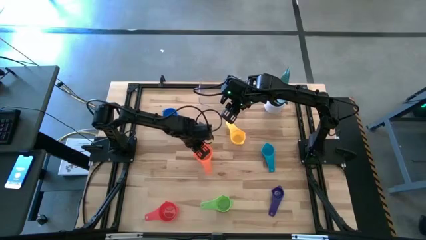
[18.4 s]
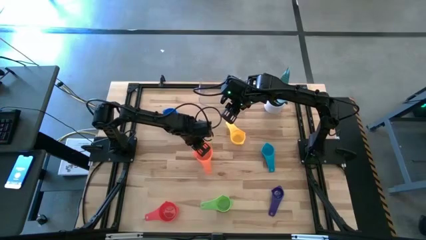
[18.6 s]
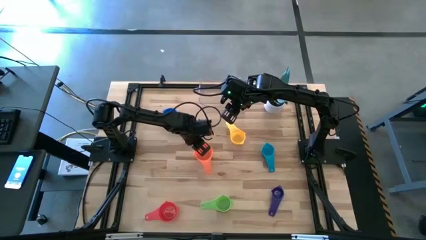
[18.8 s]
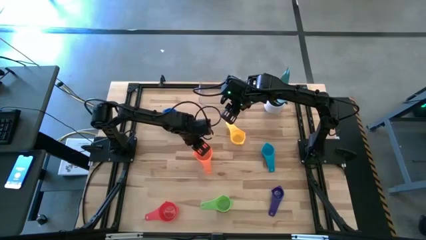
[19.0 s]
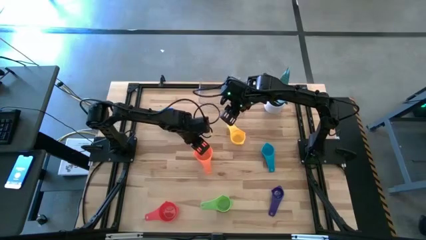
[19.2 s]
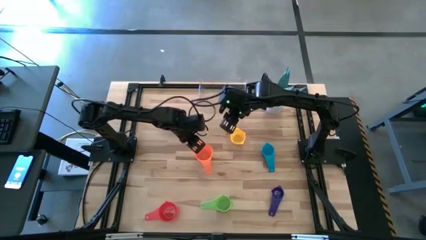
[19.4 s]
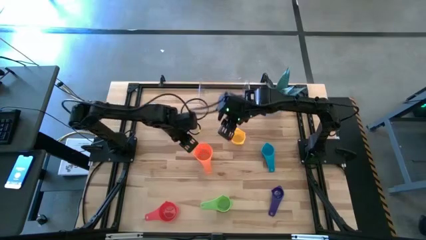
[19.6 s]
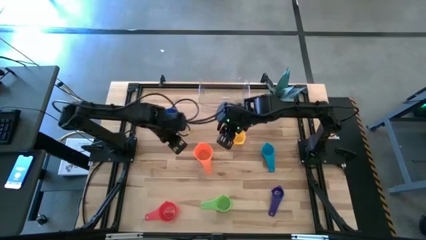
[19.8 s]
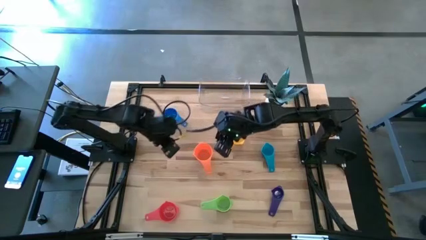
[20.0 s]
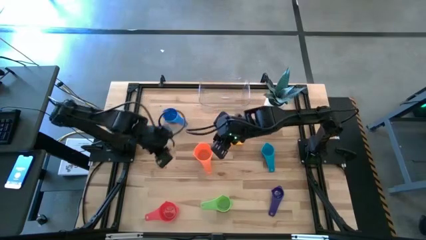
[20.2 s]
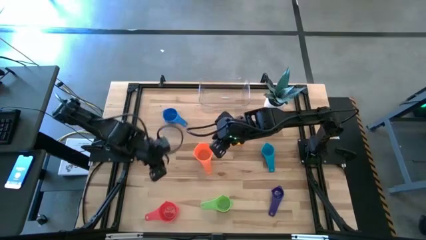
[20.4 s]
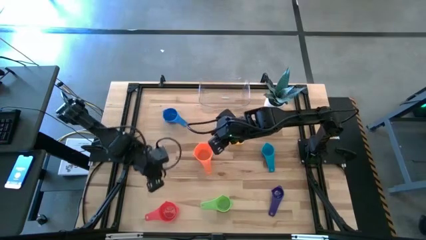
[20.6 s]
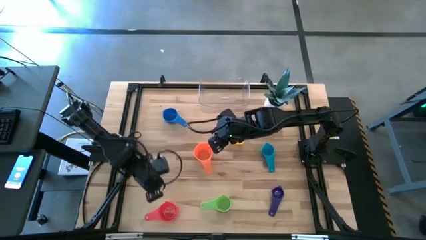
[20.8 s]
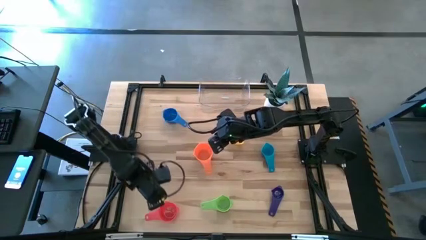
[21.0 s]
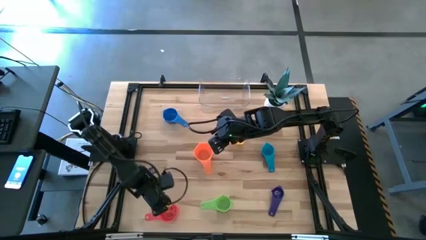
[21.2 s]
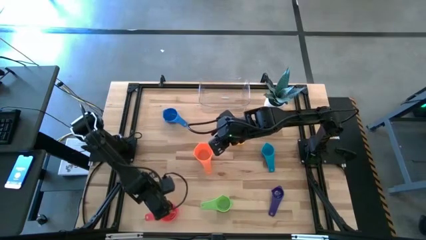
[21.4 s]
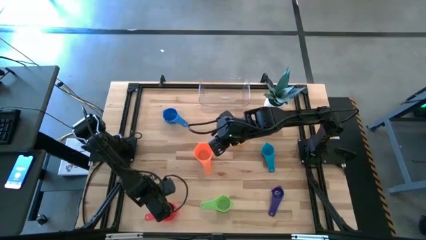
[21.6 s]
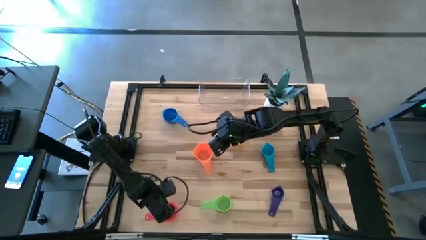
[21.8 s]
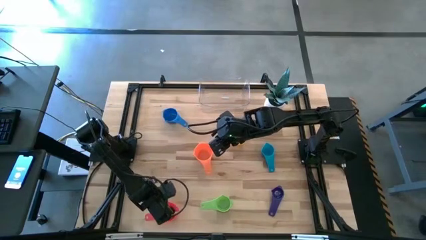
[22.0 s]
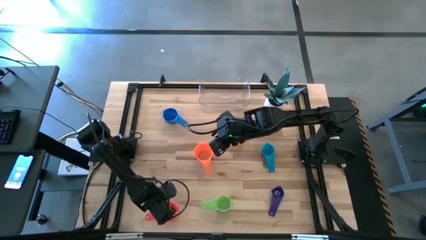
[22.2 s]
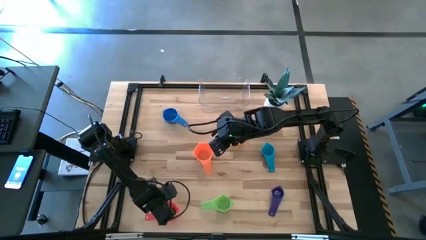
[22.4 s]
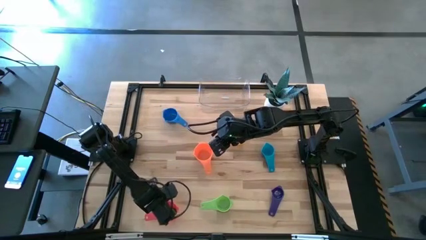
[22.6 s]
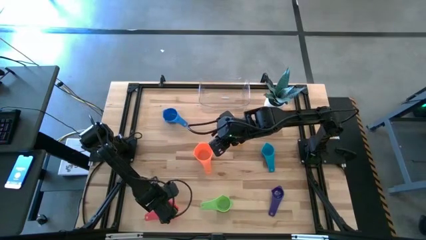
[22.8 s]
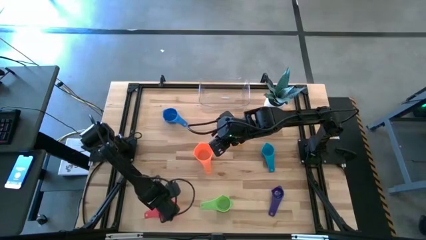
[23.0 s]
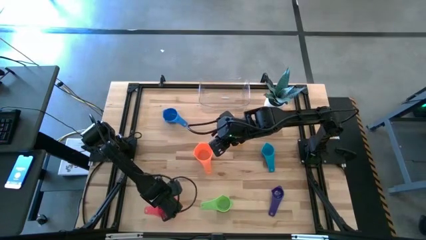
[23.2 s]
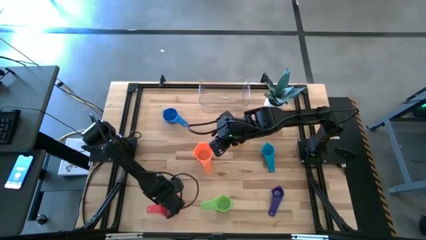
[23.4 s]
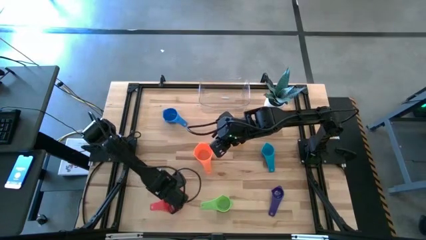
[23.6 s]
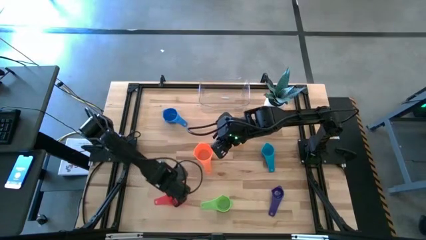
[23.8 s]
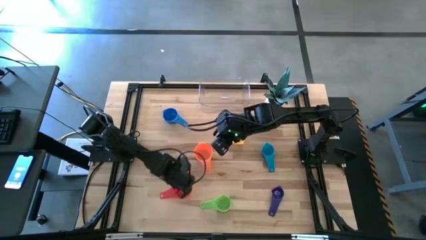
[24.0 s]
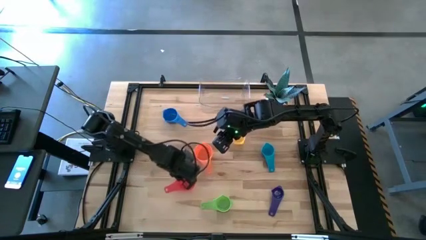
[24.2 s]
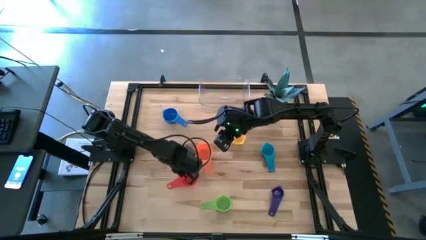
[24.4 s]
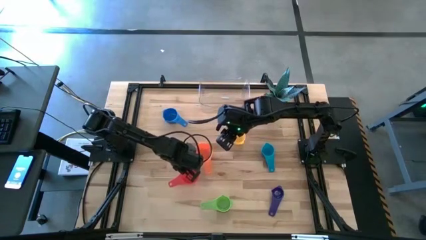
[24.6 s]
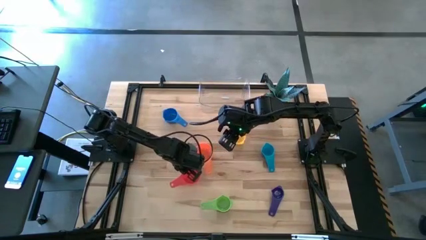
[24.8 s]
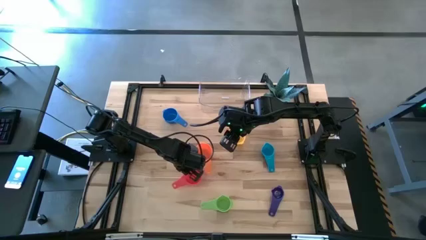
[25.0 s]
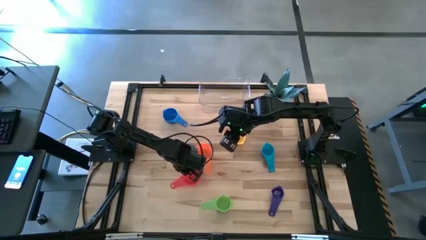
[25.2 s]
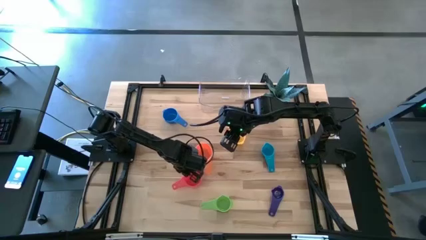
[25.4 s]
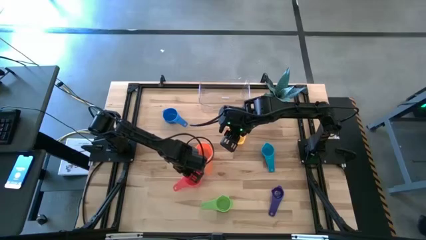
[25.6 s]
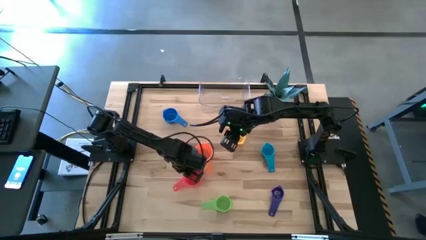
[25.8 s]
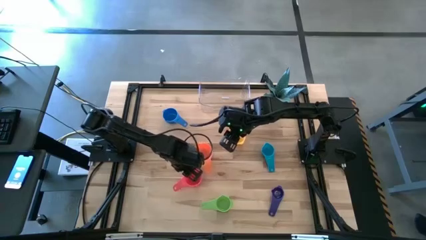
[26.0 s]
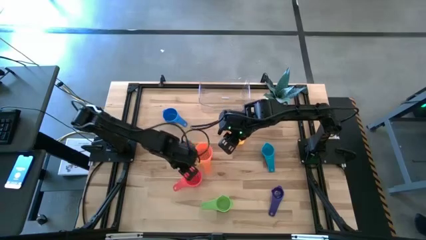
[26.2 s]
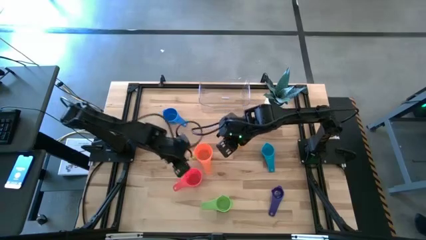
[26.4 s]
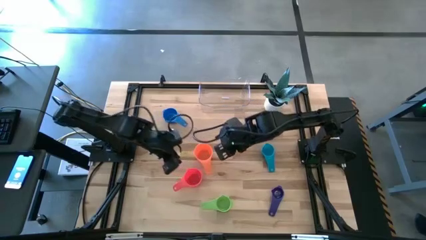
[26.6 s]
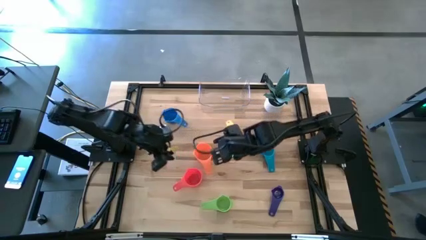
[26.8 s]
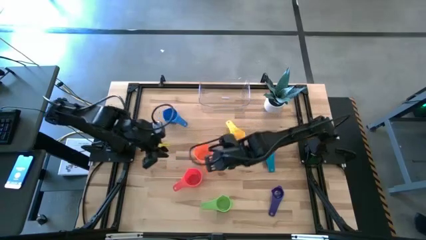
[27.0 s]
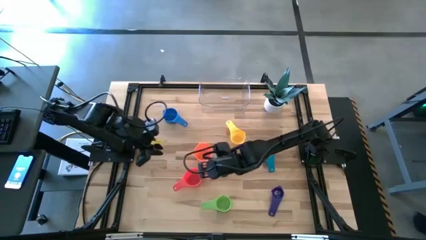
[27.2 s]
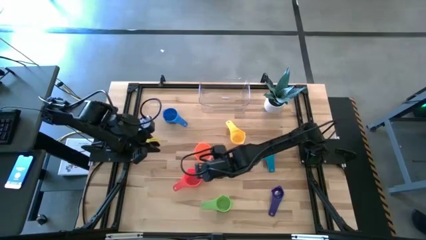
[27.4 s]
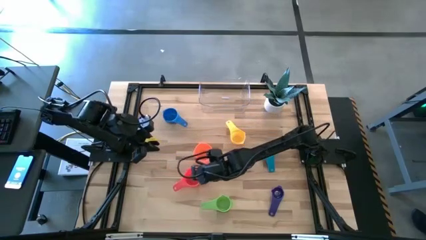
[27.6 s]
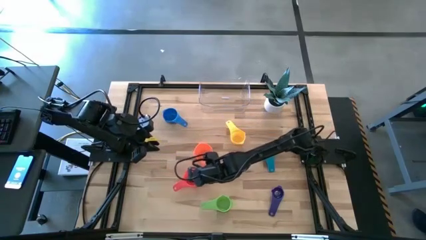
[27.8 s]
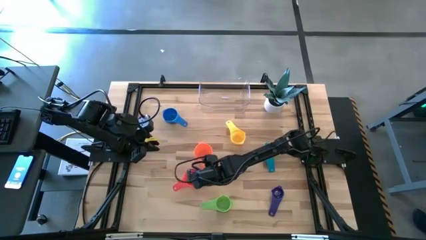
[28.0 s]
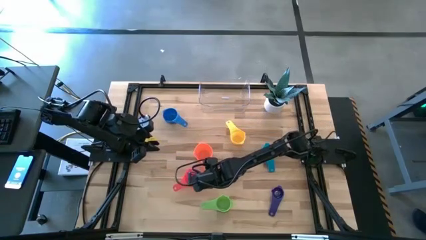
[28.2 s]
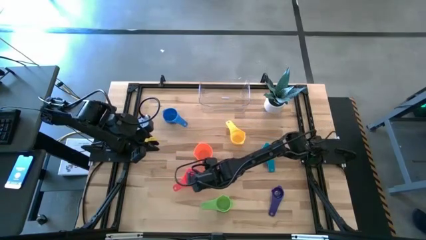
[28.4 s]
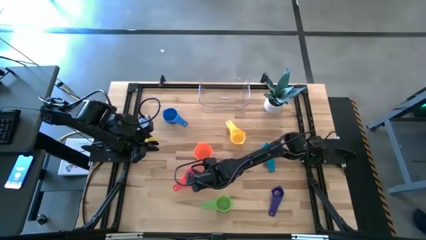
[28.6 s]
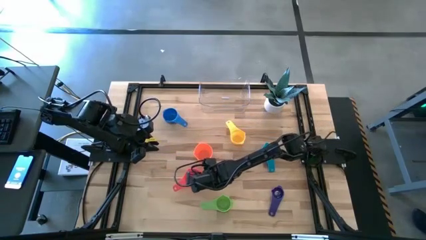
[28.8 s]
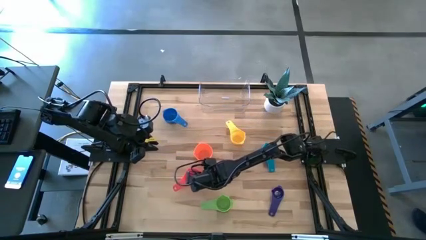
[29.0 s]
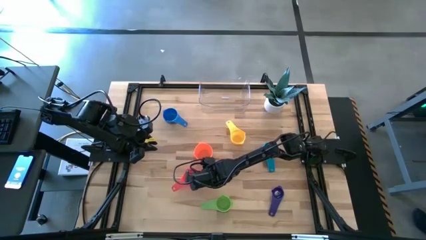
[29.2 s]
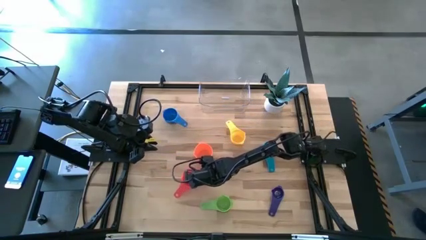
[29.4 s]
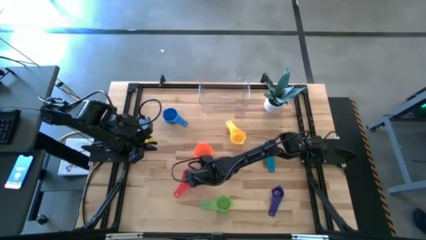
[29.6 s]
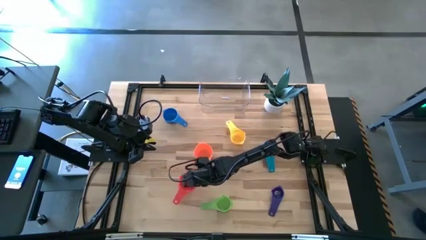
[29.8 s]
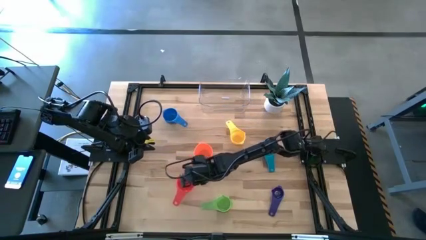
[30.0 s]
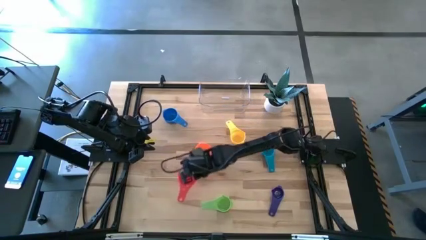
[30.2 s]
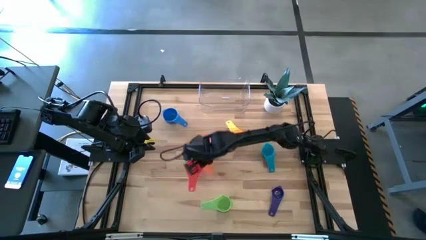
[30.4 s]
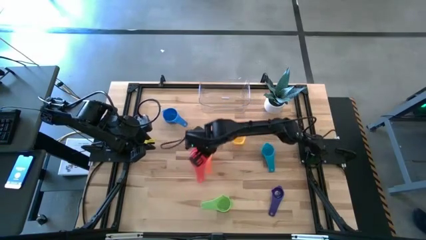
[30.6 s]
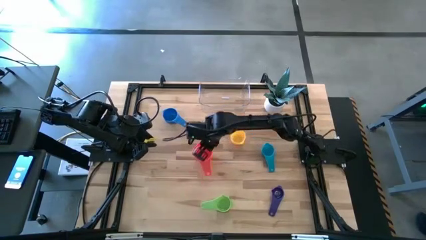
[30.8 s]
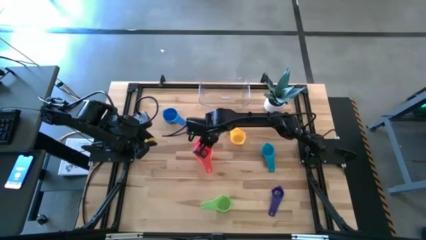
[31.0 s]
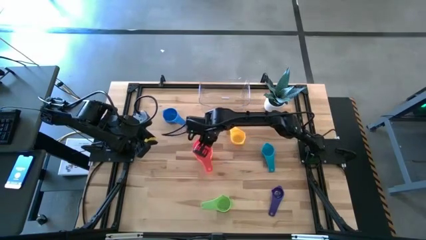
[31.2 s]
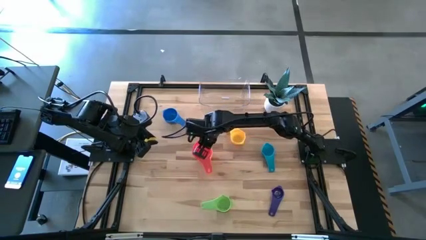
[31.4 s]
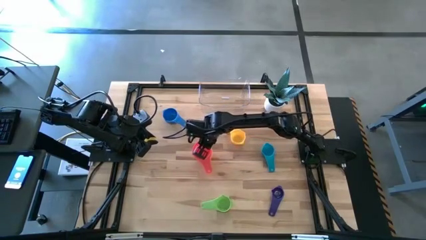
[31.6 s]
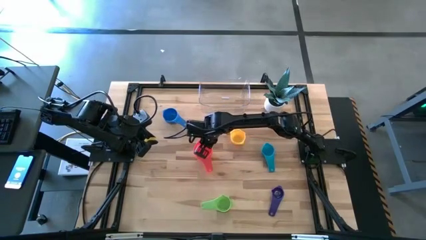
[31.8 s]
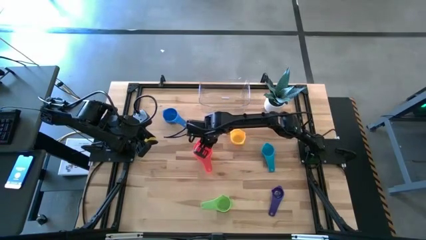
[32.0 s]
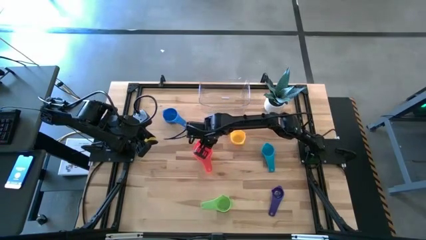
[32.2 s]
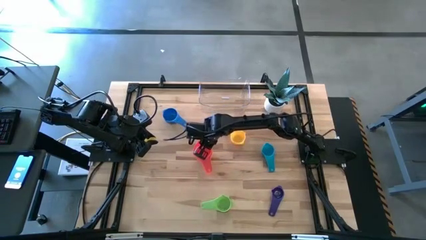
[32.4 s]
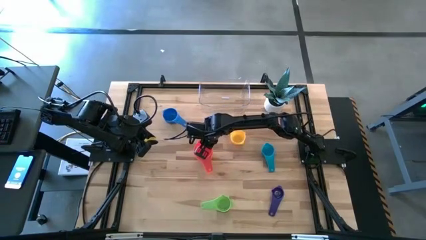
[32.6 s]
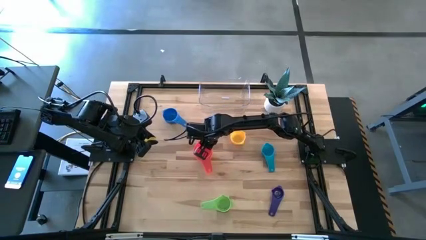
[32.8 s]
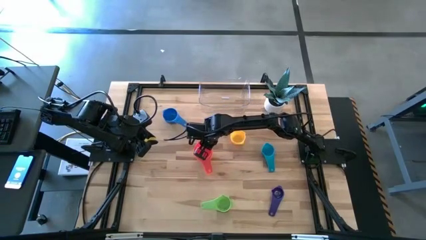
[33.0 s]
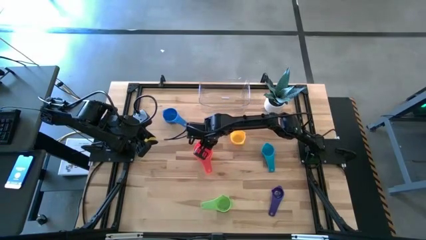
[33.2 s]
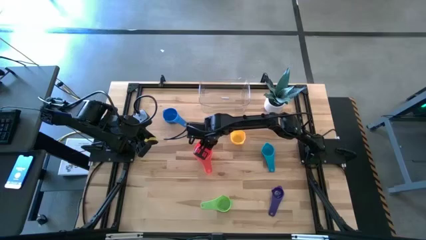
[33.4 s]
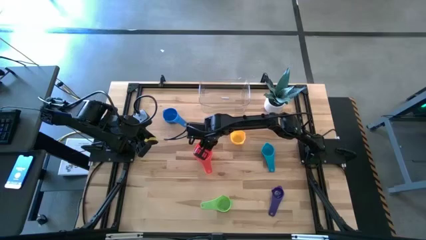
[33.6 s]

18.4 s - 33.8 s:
Task: Nest measuring cups in basket
Stack the red measuring cup on the top of the orange measuring cup

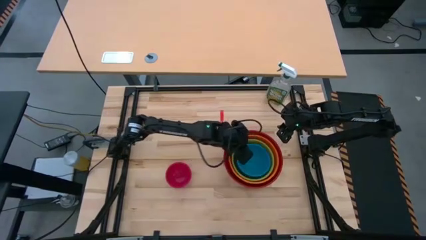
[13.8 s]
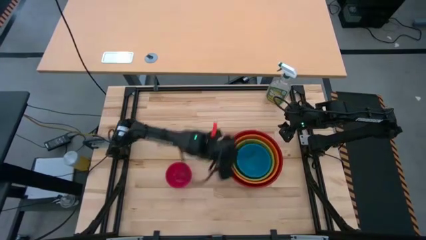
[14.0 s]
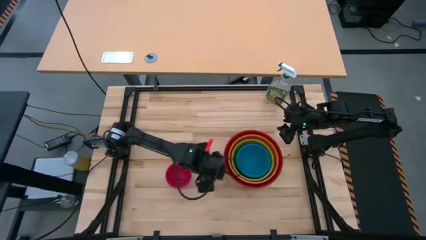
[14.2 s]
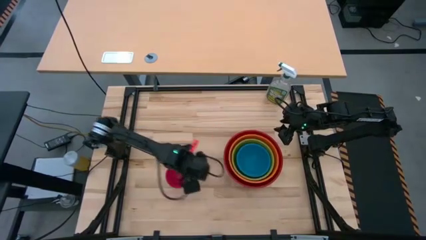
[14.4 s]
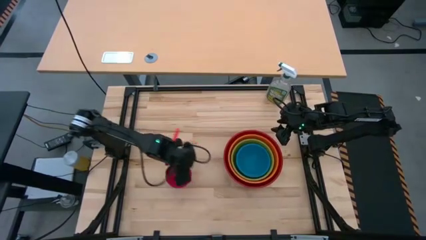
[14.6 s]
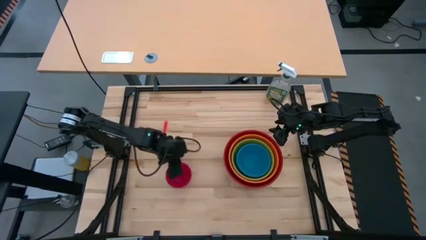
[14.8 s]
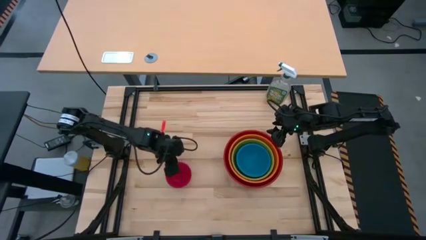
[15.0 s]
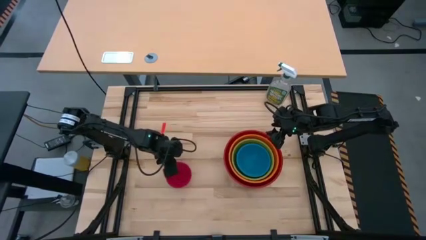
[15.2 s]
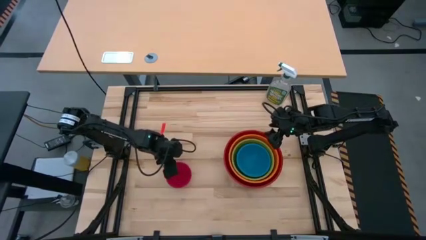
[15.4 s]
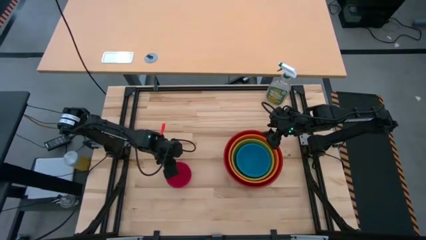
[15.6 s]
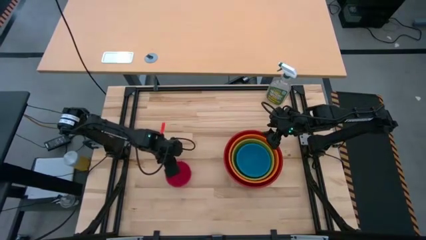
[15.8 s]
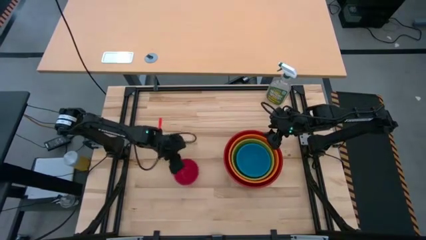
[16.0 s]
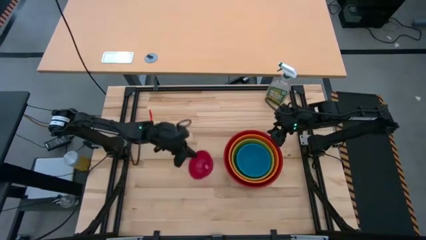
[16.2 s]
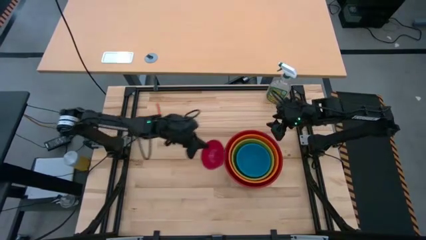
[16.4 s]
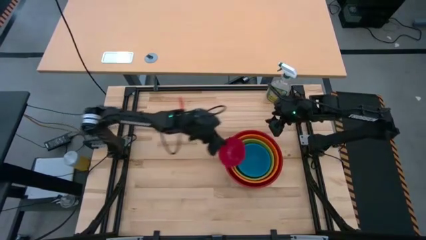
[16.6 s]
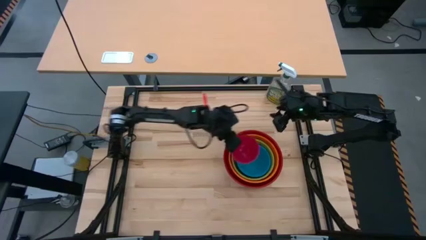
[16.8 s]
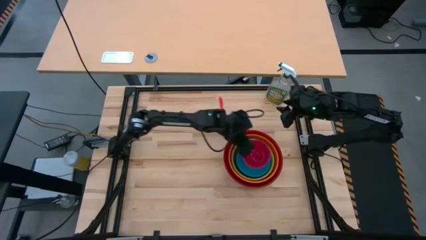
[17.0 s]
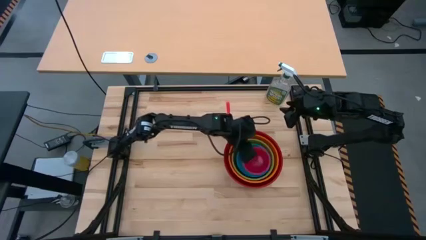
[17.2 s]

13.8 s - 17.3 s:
Task: Nest bowls inside each other by size order
Stack the pink bowl on the blue bowl
